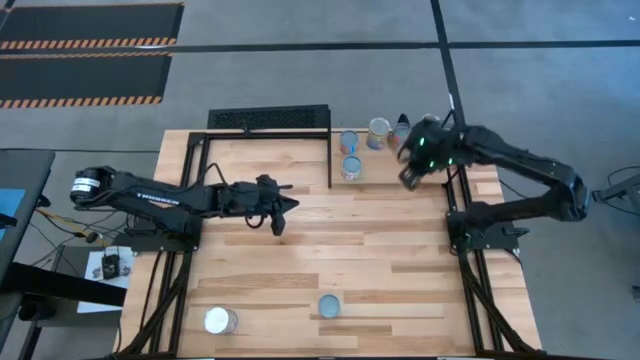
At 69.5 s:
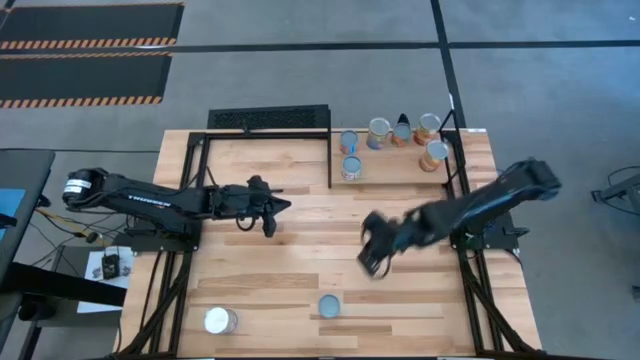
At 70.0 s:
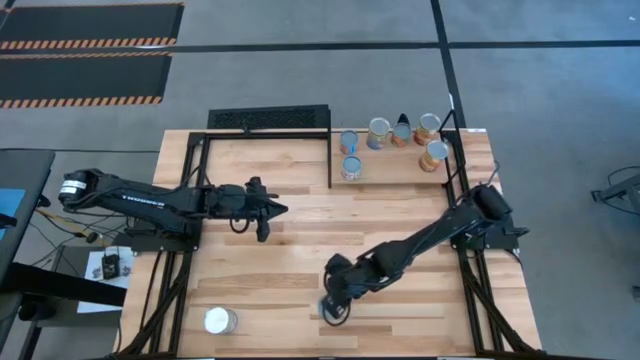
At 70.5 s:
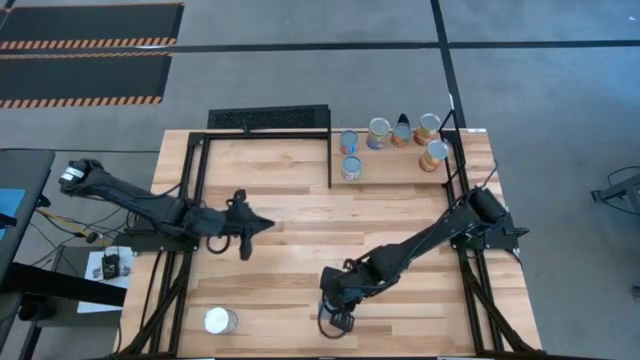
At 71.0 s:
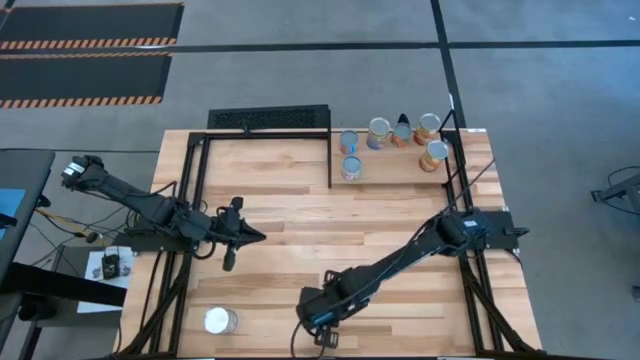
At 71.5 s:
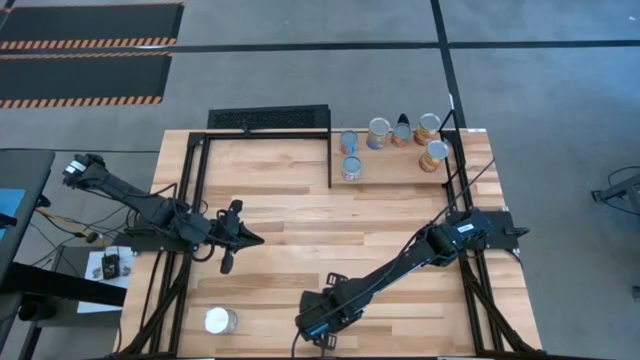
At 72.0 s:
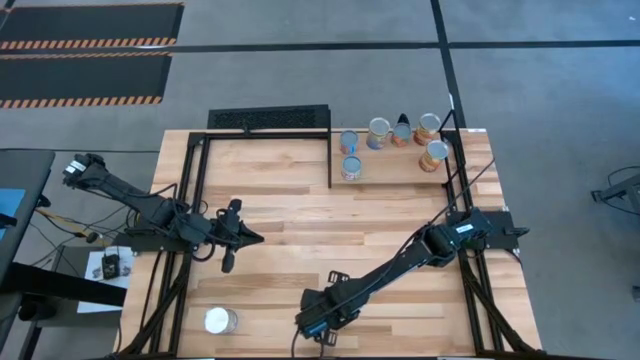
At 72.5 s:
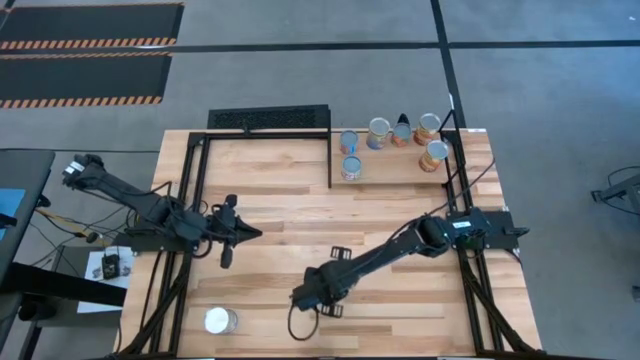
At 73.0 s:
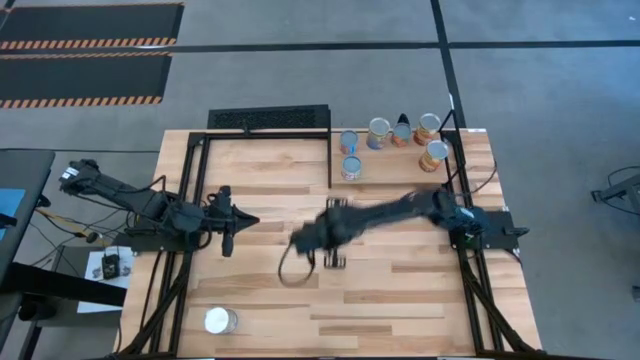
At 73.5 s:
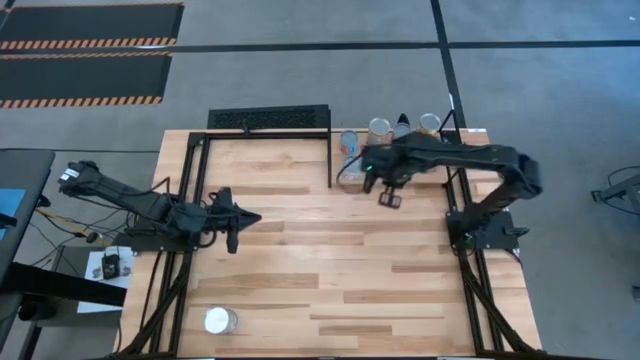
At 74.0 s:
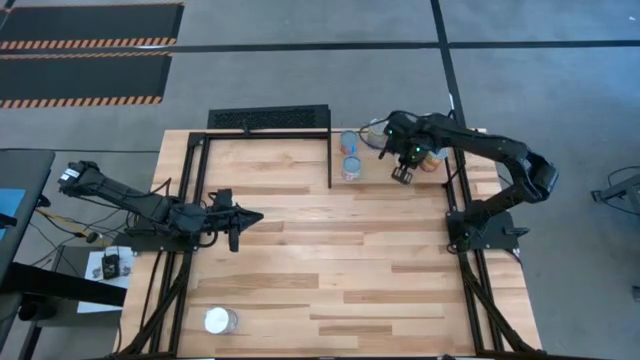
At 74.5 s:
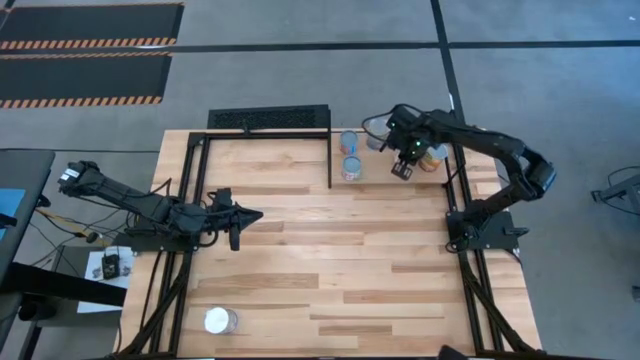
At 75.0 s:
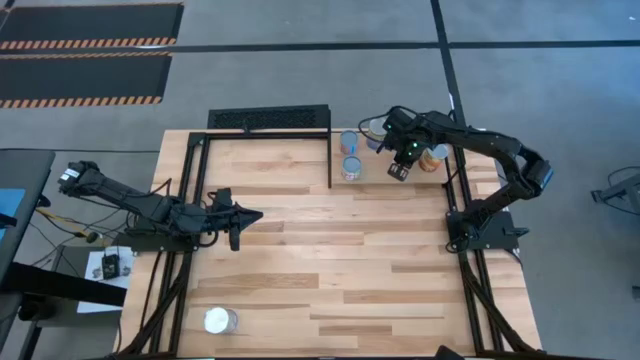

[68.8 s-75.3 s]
Task: Pick and place cans onto a shelf
Put the canned carrot on the shelf

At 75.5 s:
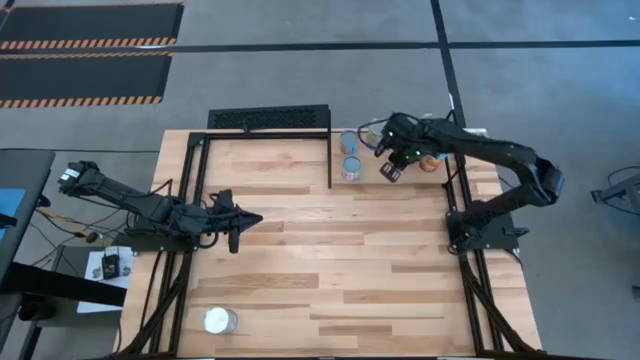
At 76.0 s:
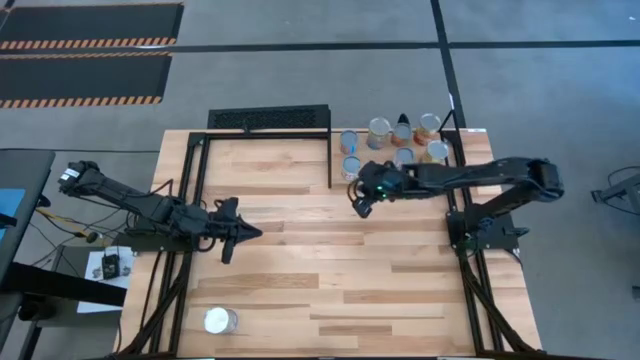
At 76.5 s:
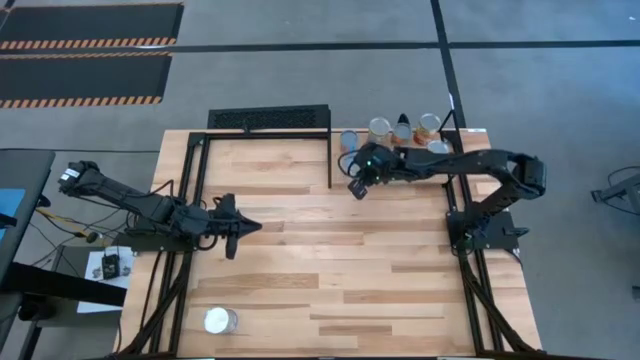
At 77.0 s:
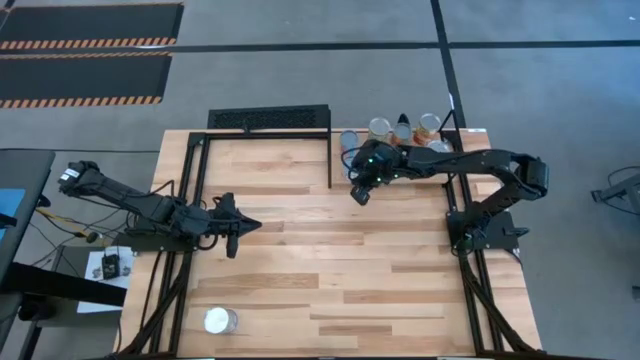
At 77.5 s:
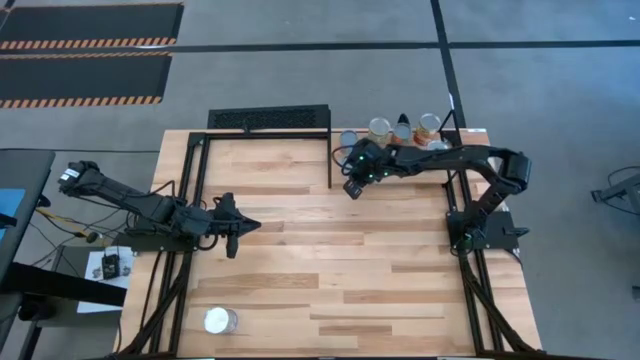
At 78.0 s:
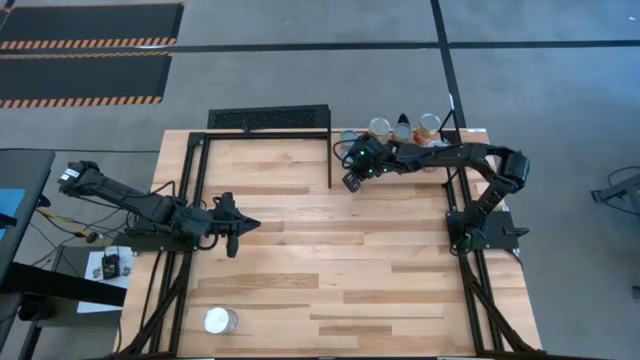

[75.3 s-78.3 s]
Adjust the canned peas on the shelf

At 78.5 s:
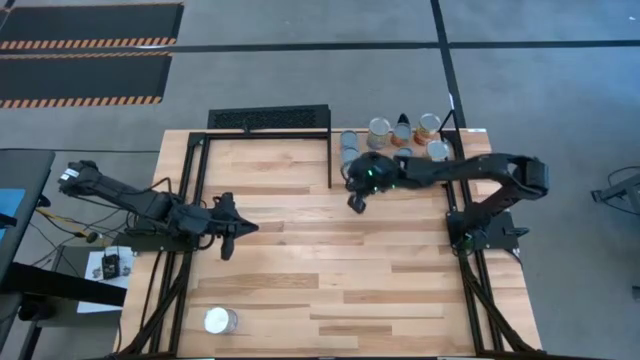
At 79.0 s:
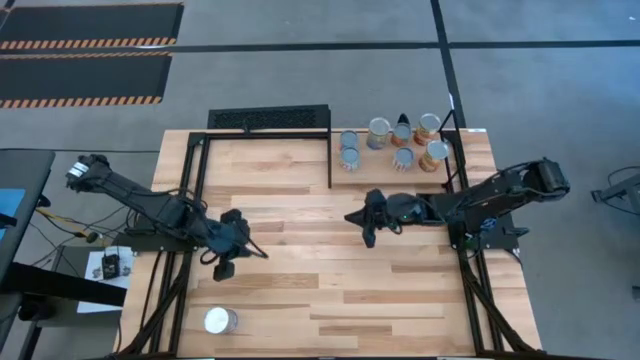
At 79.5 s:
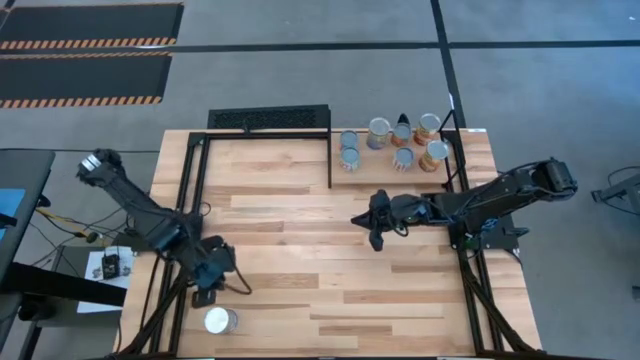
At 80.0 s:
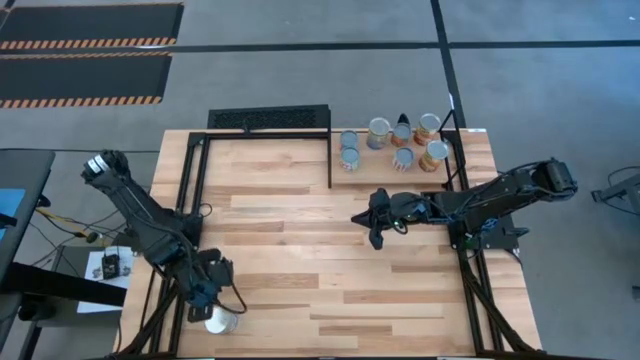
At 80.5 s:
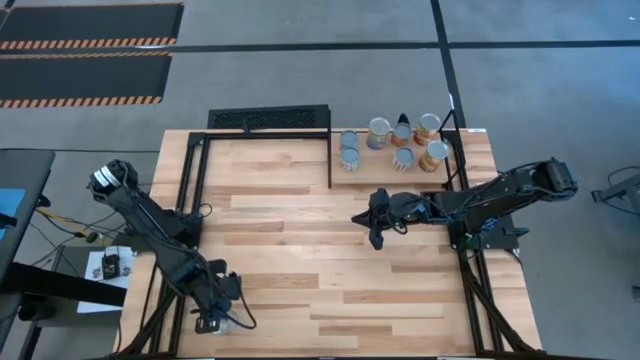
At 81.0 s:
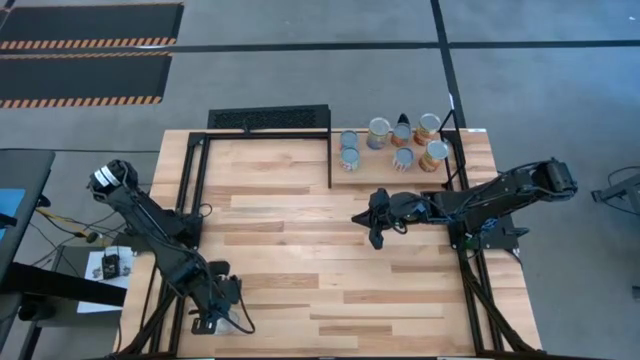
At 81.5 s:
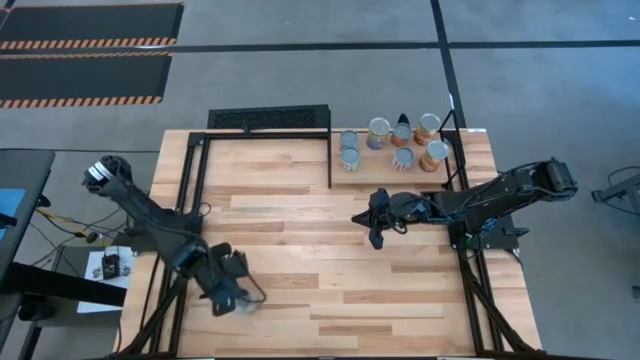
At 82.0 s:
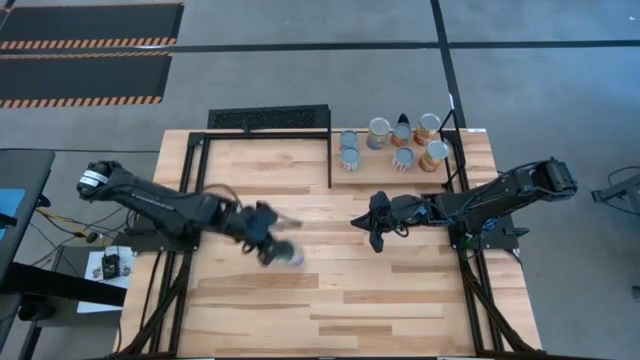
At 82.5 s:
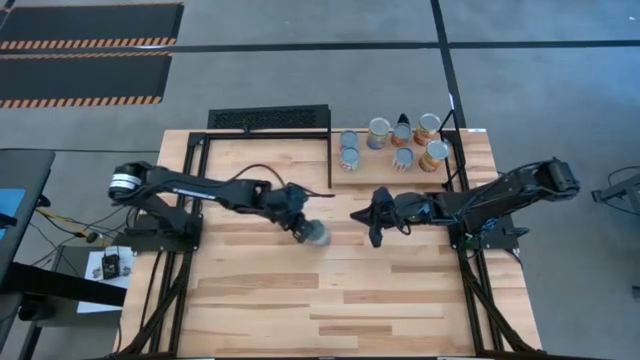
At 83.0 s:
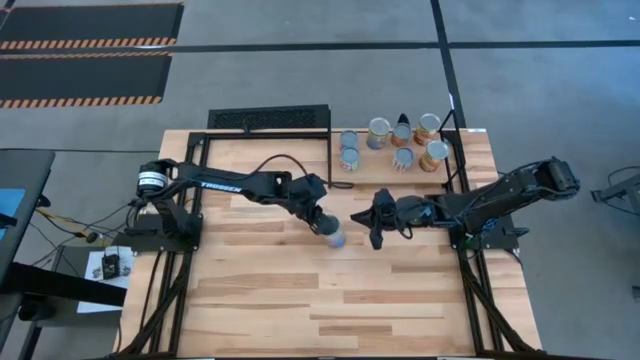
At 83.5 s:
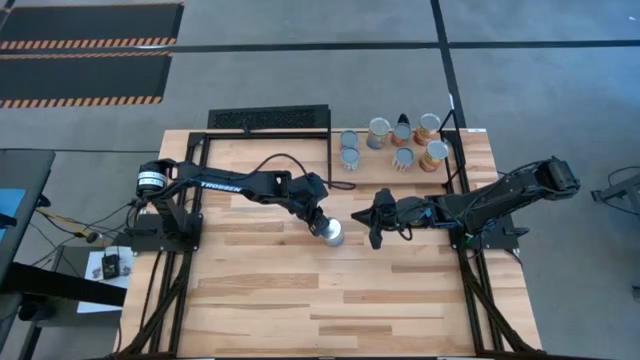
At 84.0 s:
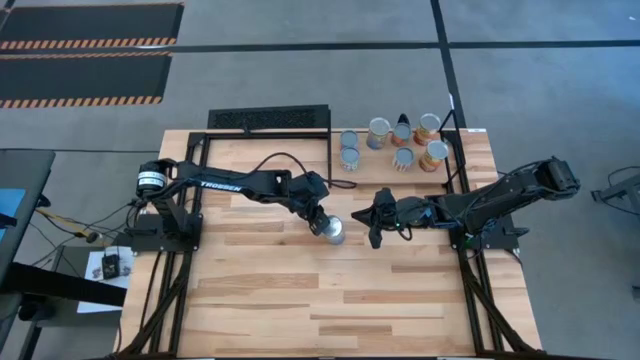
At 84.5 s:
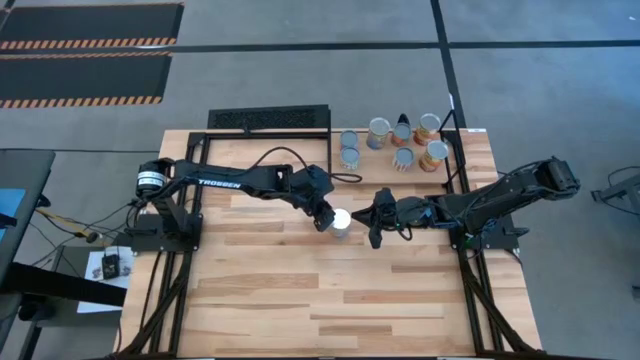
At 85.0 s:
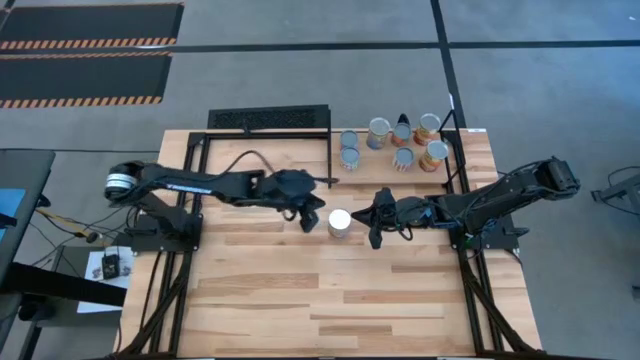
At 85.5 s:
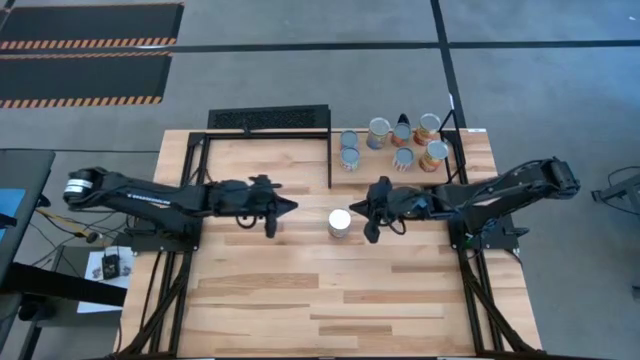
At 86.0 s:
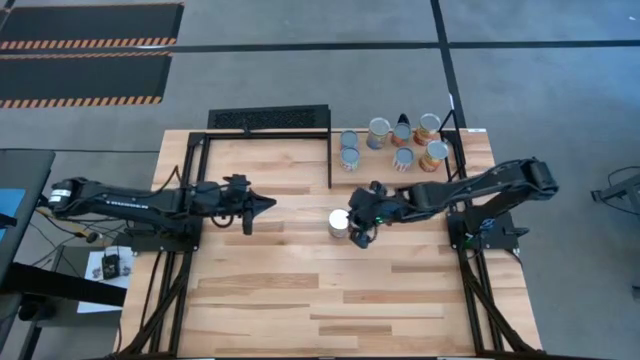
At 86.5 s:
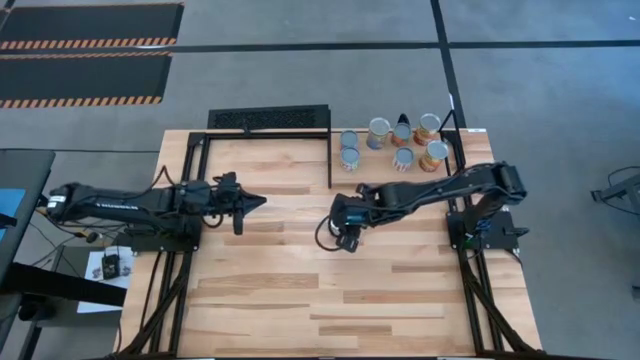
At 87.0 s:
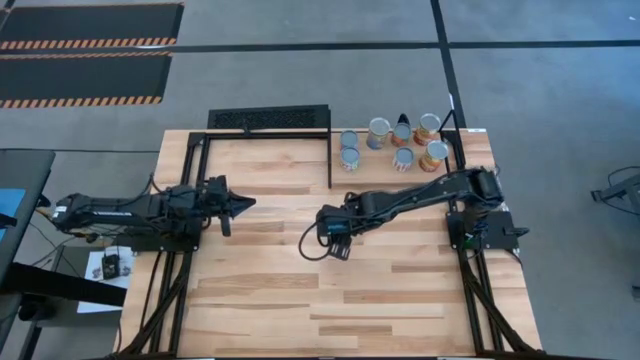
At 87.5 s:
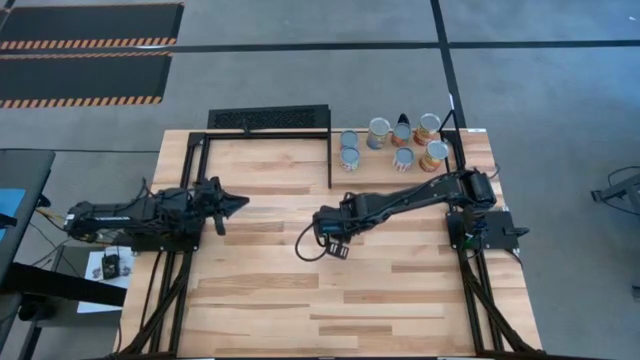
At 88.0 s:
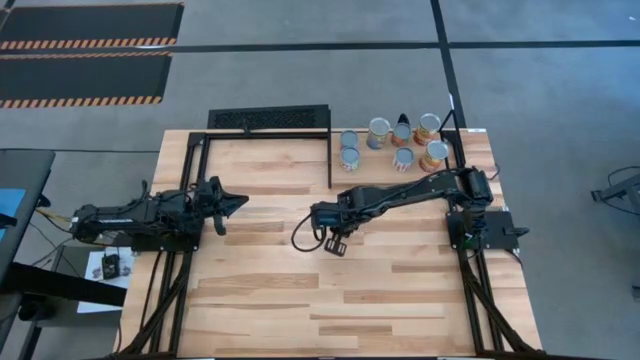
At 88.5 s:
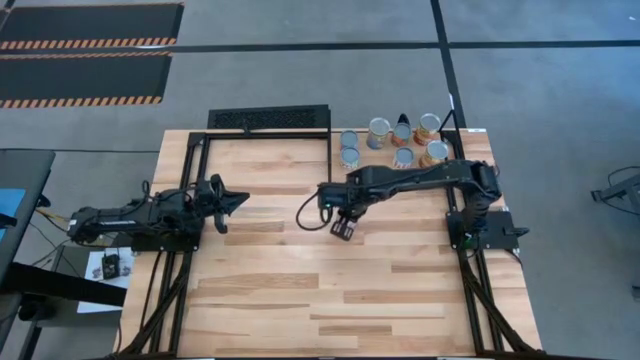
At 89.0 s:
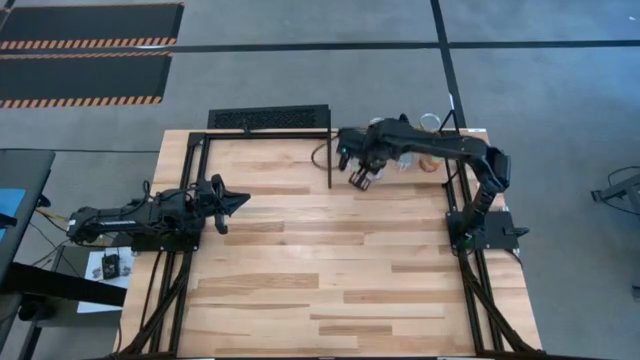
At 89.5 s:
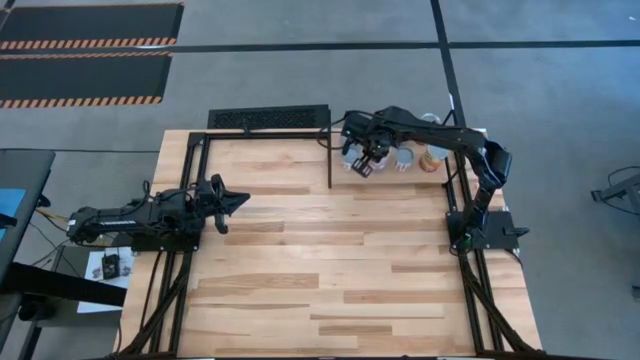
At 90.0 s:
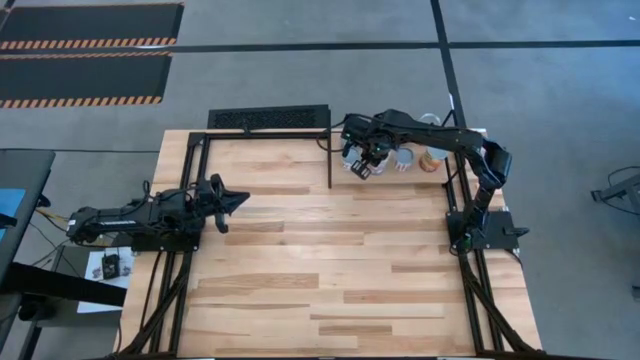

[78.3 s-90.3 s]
Put the canned peaches on the shelf
